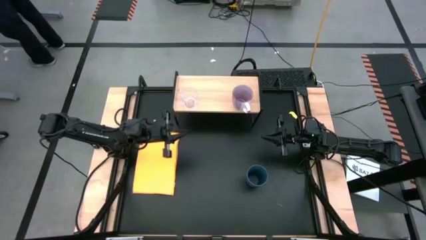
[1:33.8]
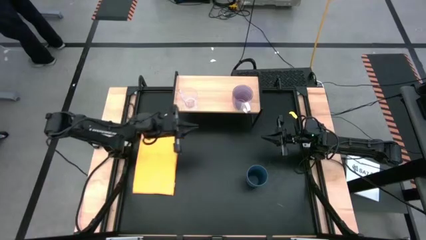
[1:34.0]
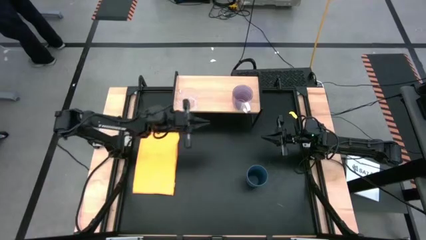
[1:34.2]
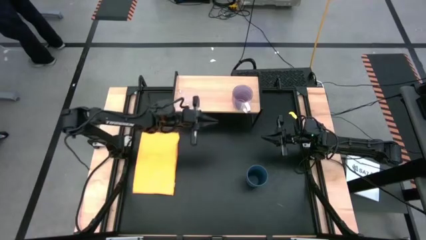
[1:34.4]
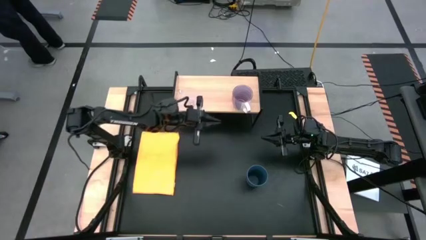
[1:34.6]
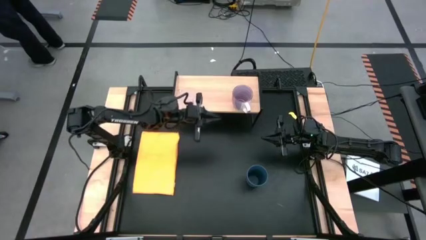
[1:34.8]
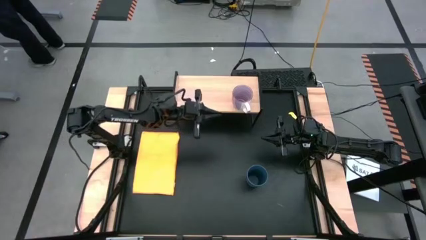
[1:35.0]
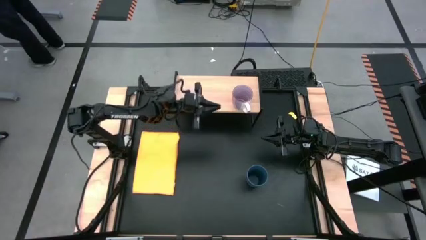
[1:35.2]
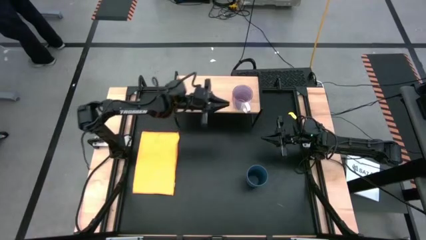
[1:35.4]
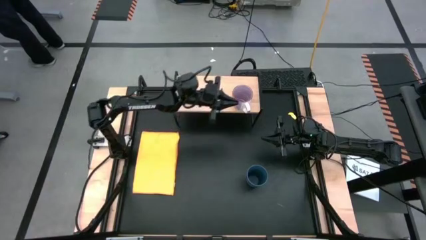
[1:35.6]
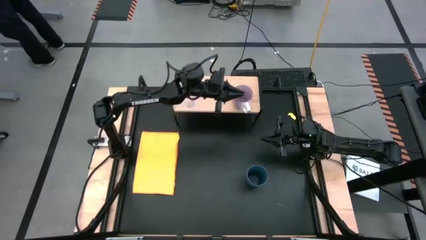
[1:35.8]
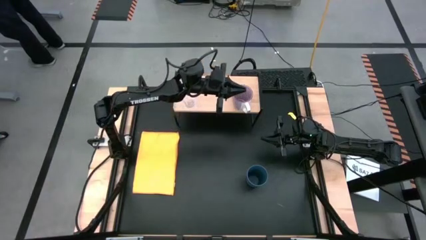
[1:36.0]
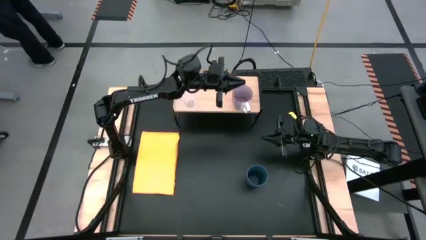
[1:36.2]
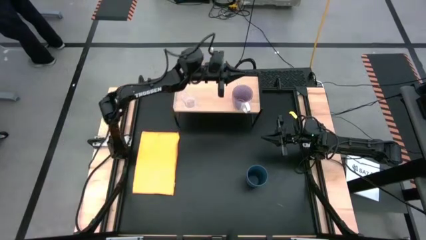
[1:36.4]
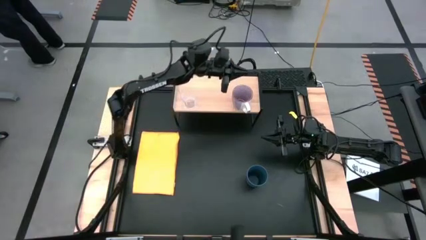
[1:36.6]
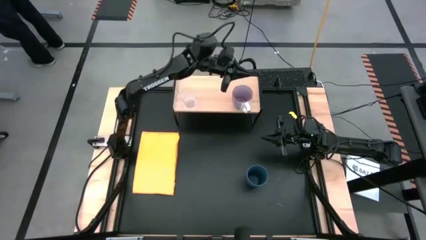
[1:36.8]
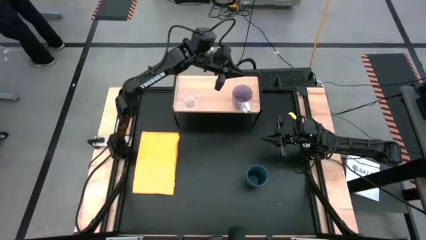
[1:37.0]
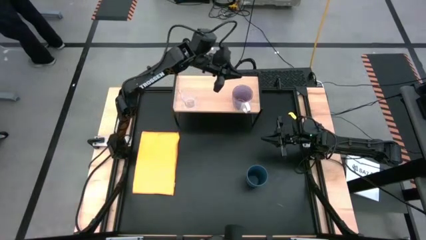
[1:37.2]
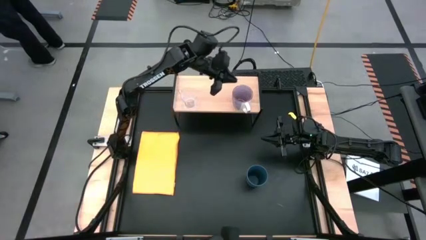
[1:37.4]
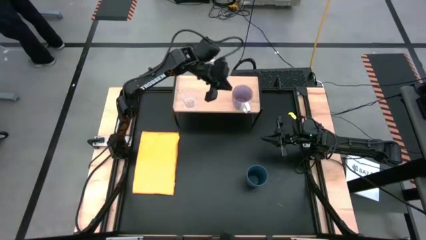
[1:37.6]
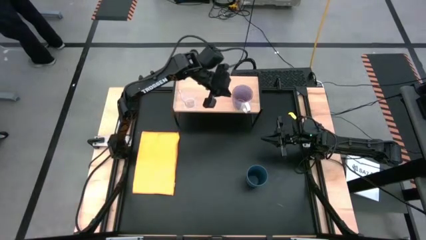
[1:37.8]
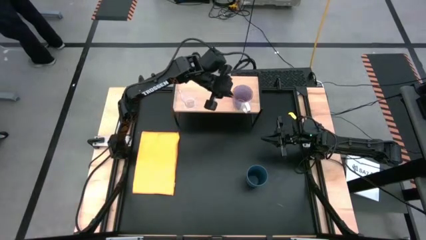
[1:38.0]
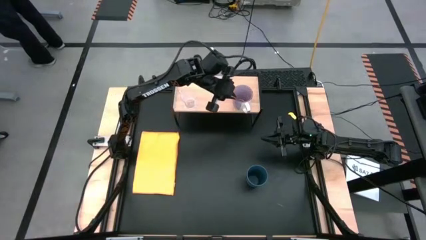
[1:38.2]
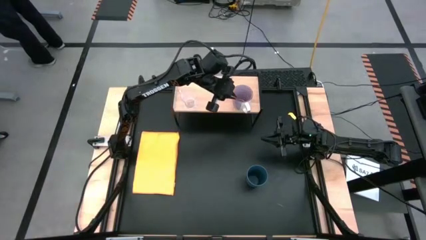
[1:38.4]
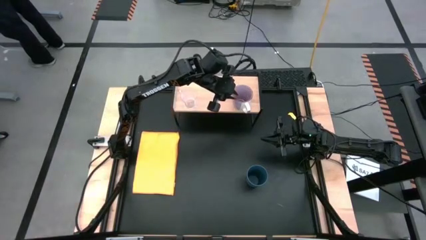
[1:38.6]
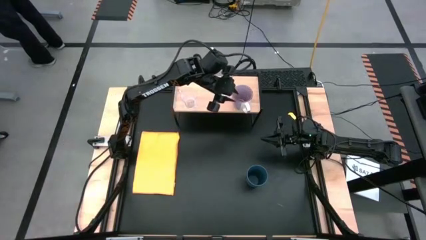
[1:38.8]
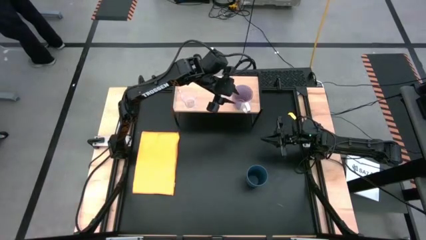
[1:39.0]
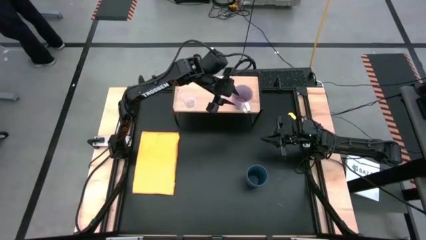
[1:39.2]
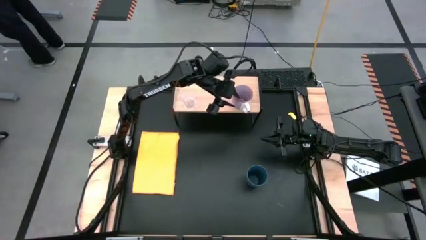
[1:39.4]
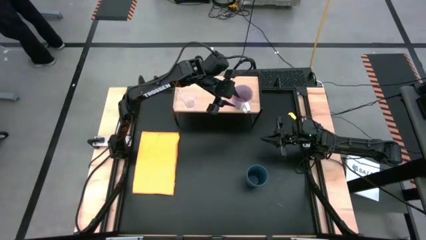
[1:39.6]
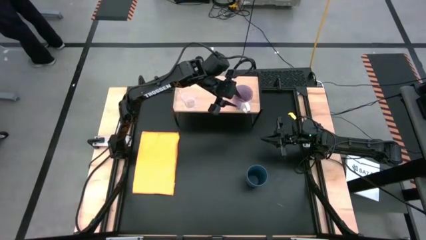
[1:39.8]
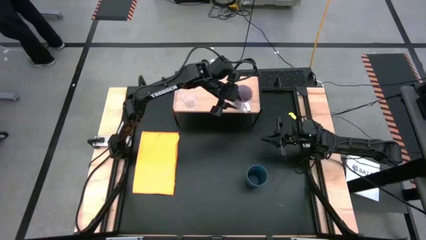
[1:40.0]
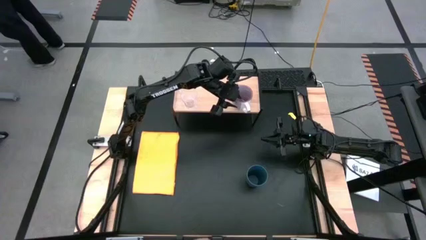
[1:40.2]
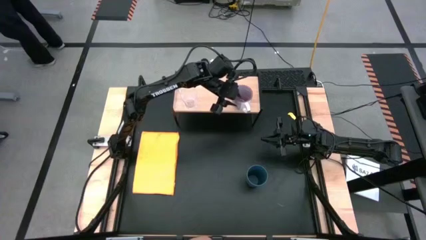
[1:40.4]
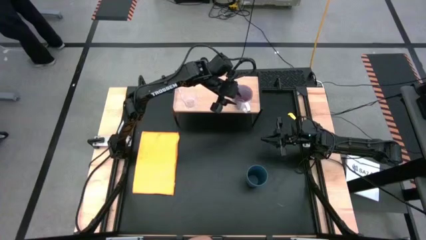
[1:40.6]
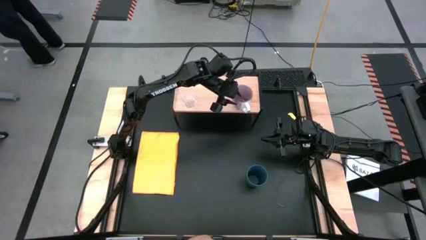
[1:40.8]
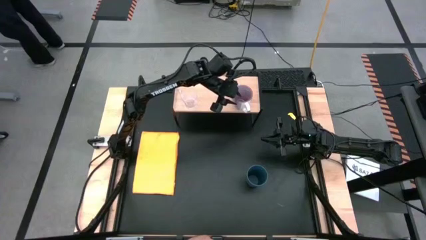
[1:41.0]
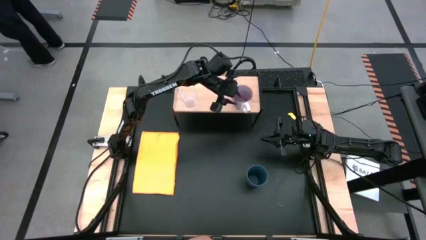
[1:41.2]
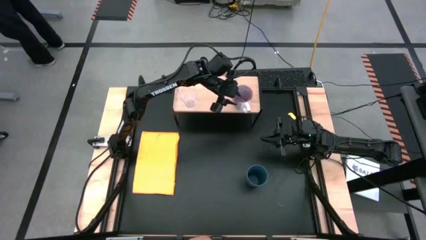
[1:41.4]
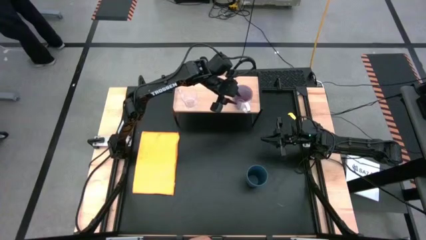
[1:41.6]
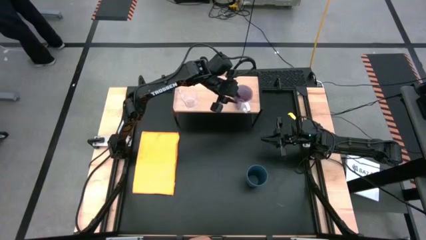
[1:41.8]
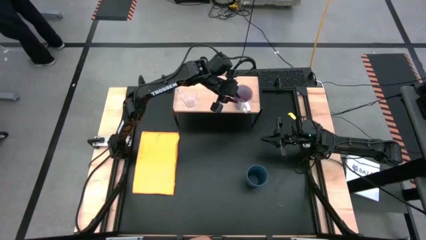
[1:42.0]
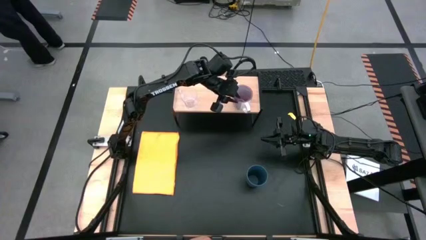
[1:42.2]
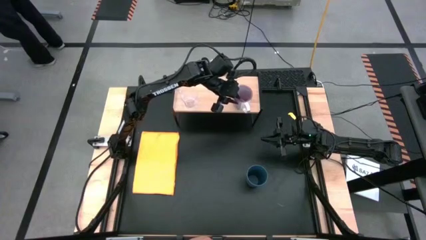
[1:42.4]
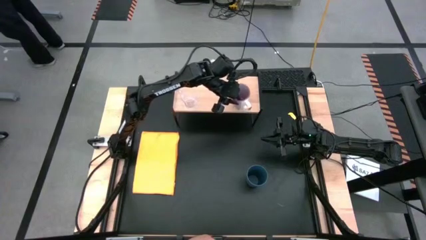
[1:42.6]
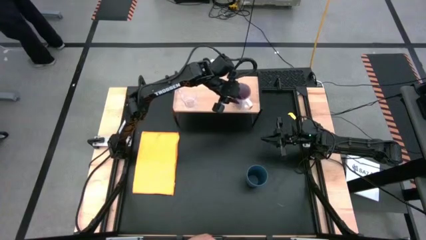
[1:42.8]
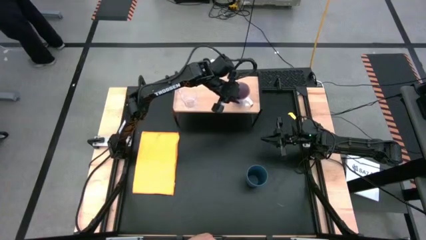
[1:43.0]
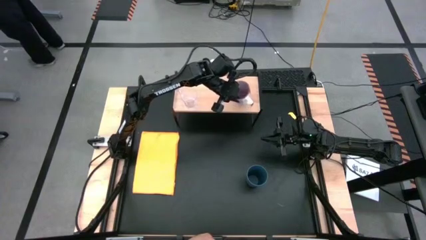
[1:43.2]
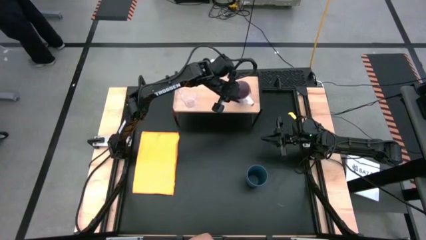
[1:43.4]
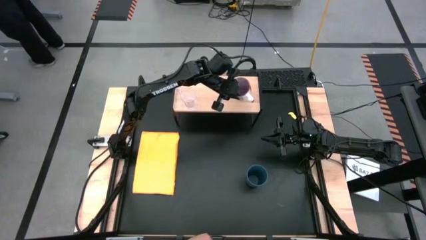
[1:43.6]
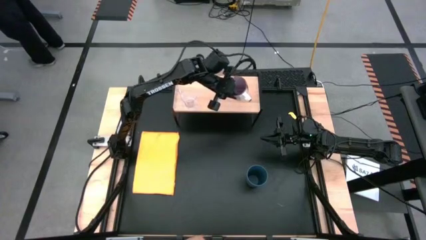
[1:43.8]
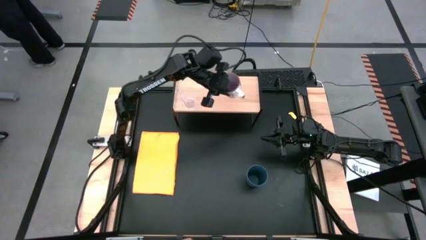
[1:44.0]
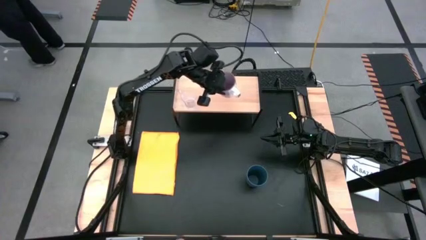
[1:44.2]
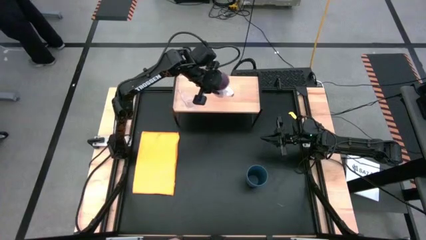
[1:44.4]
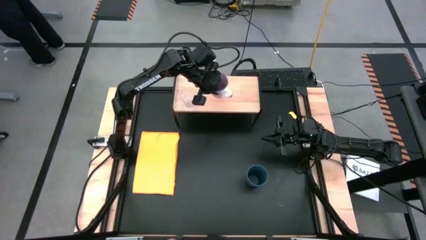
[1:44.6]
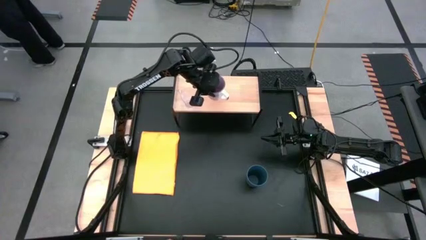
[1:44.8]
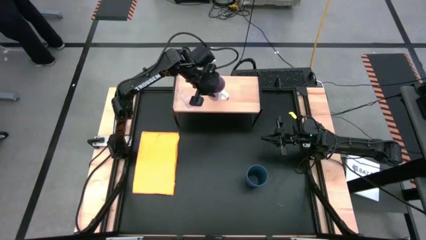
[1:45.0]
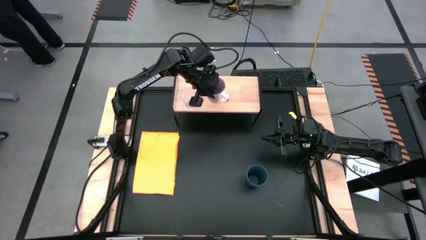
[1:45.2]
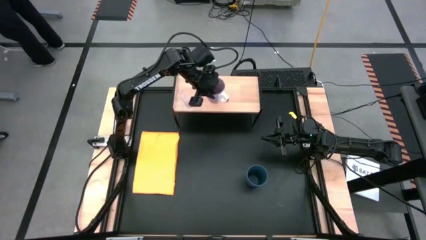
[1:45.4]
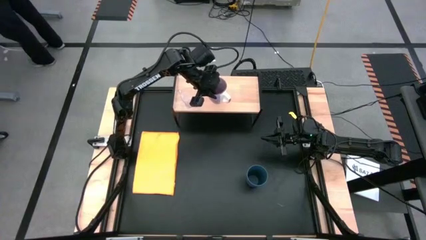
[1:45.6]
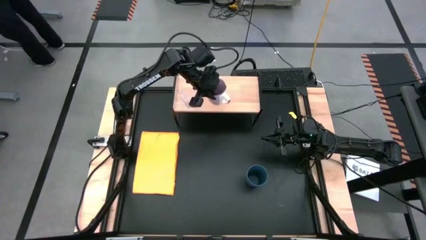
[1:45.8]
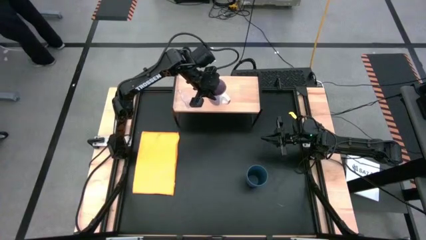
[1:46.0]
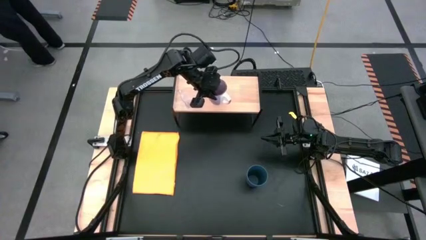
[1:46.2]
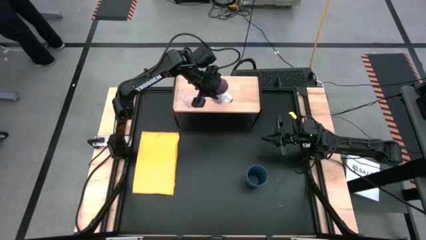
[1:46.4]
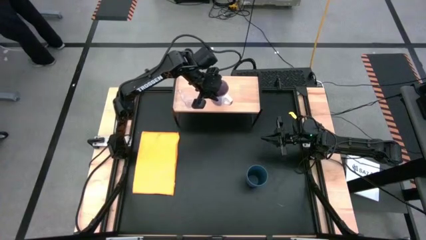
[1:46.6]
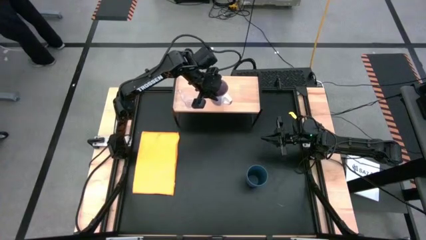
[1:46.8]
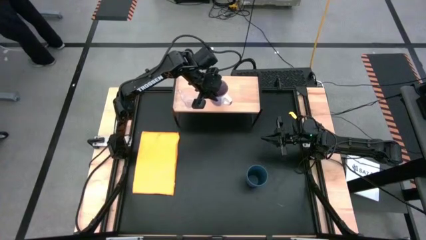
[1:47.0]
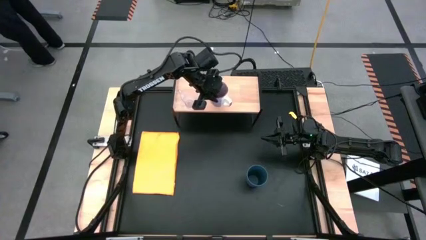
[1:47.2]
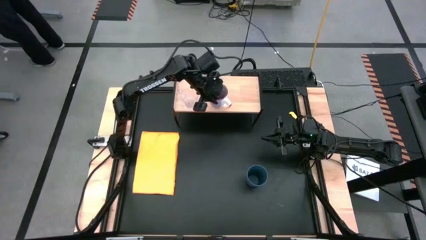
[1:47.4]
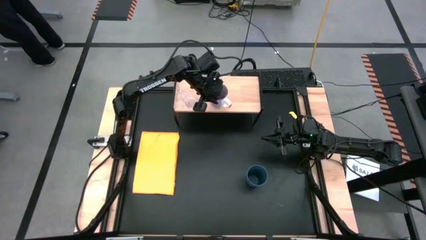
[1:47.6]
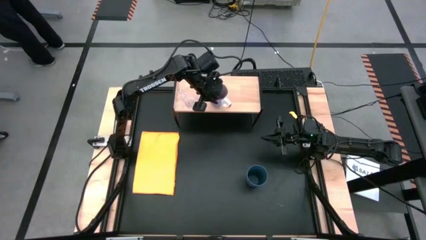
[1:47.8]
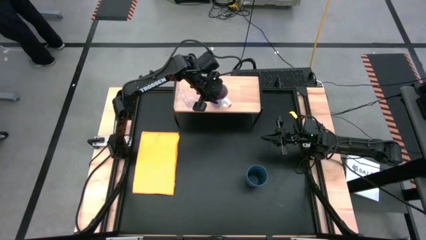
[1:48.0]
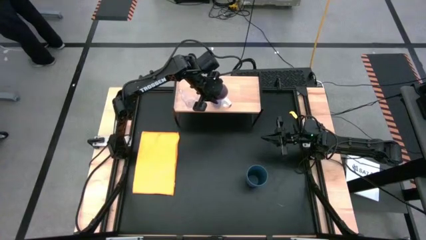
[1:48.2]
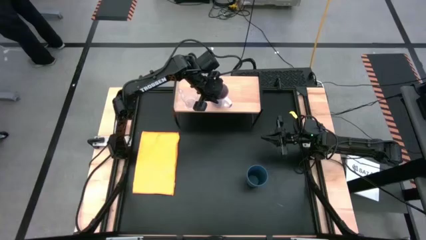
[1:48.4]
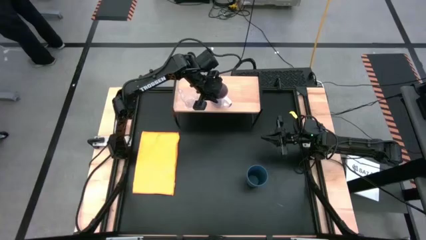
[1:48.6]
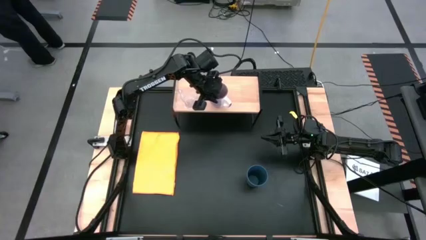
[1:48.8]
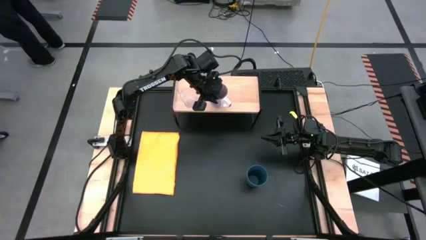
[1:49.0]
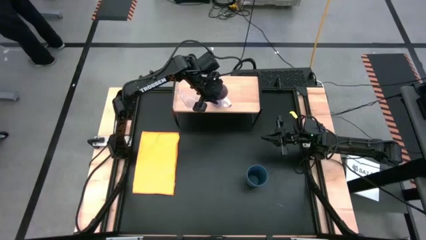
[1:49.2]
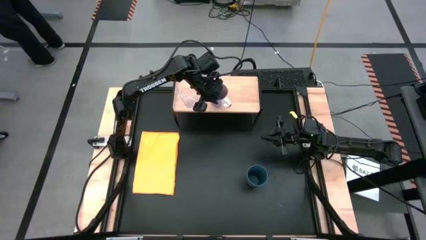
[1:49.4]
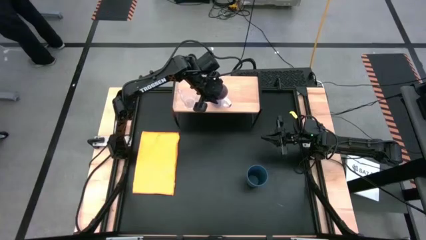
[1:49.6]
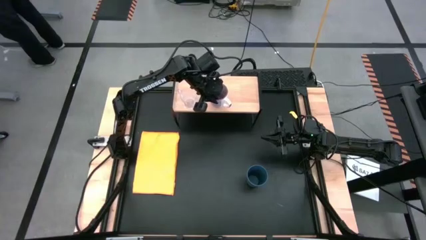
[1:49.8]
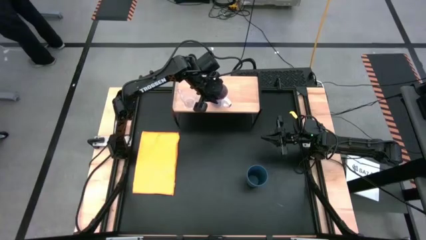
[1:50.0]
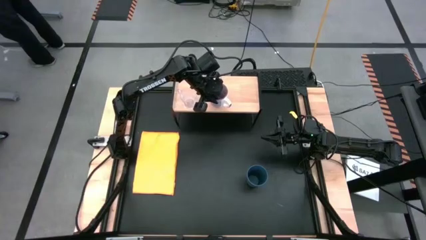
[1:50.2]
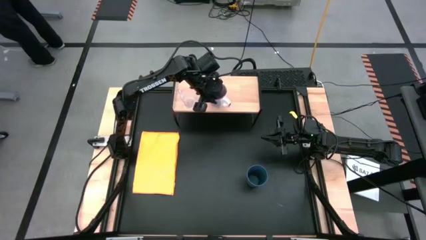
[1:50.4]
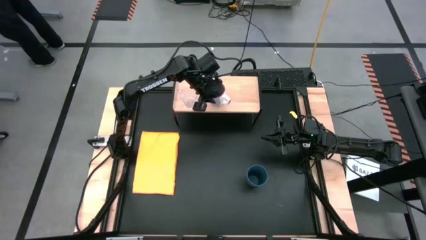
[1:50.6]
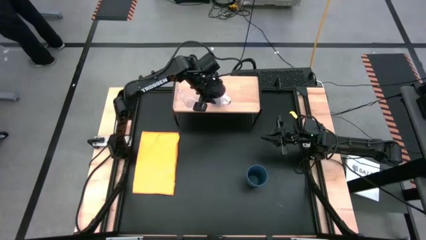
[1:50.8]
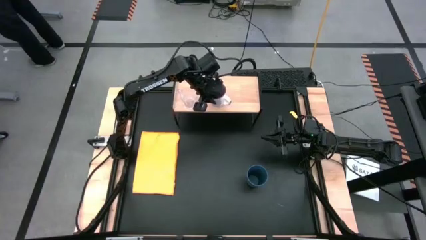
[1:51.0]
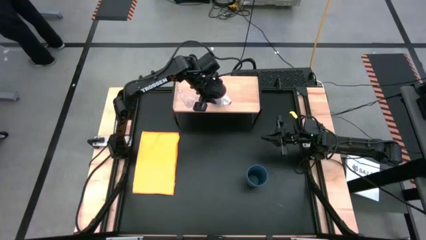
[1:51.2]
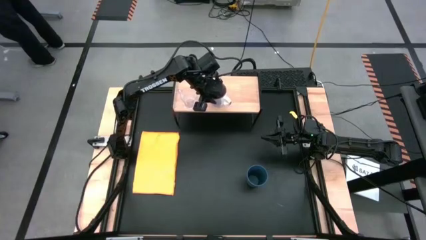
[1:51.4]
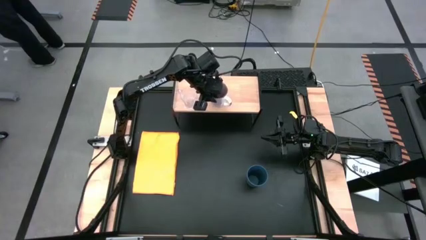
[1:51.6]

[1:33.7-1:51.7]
Task: Stack small to large cups/mugs on shelf
Put the purple mug on the shelf
